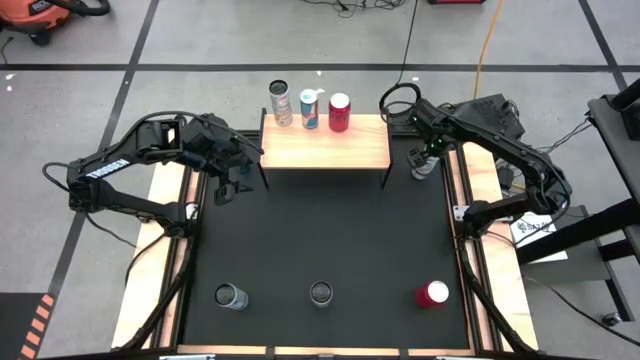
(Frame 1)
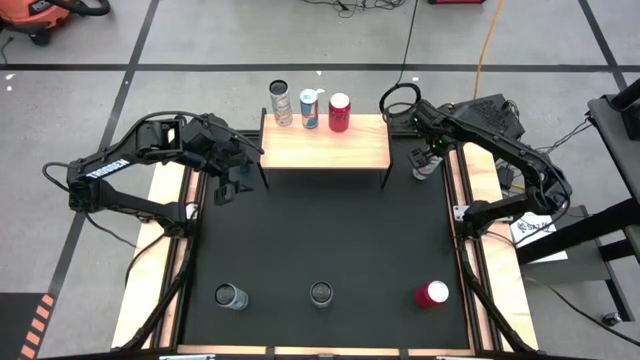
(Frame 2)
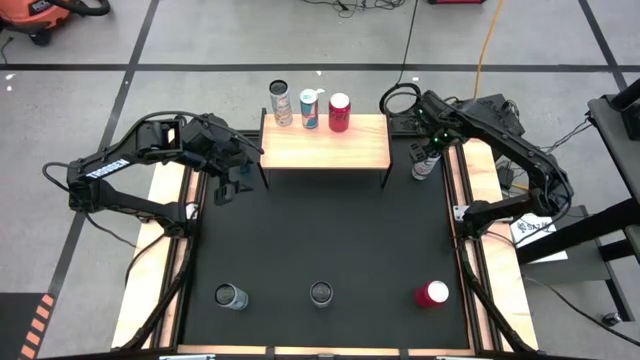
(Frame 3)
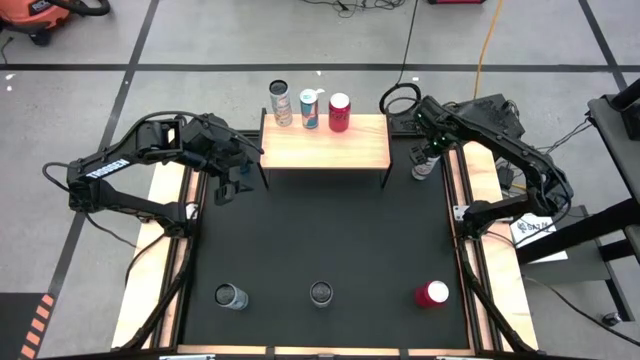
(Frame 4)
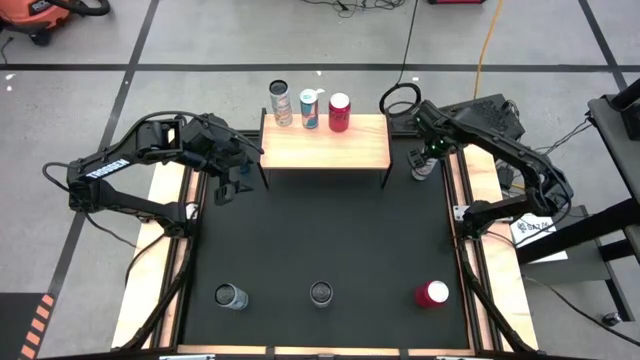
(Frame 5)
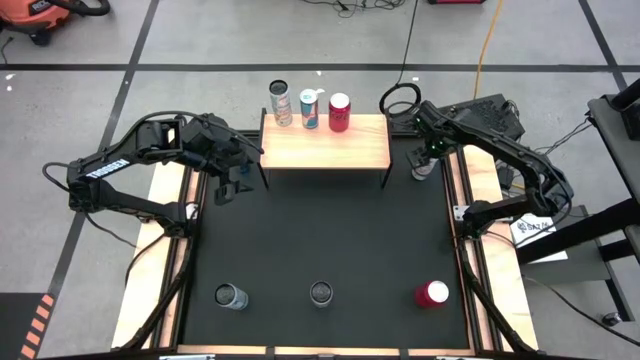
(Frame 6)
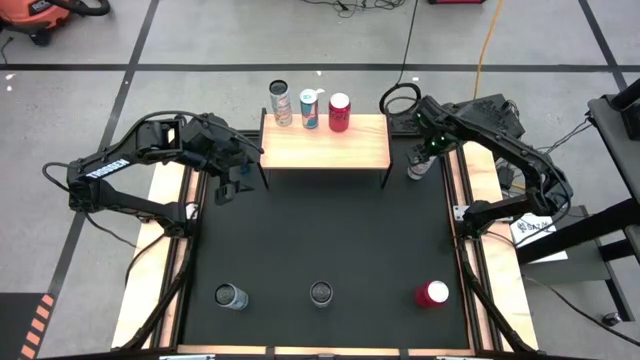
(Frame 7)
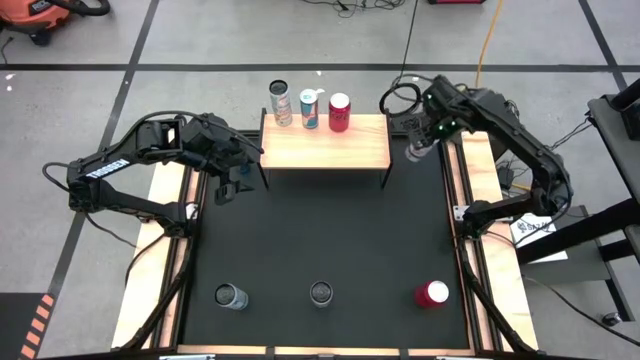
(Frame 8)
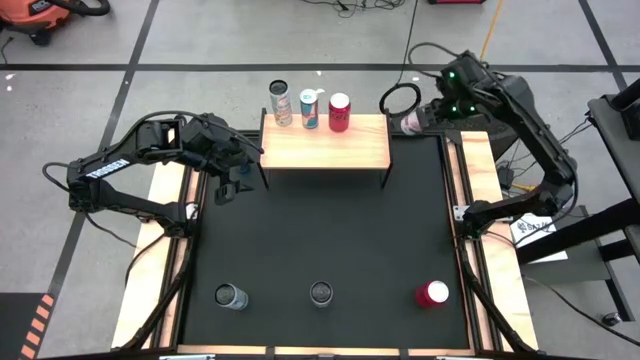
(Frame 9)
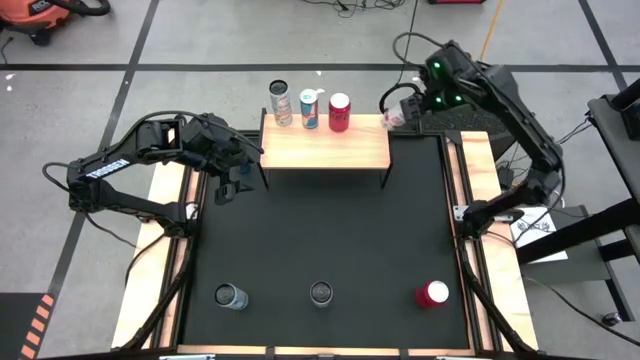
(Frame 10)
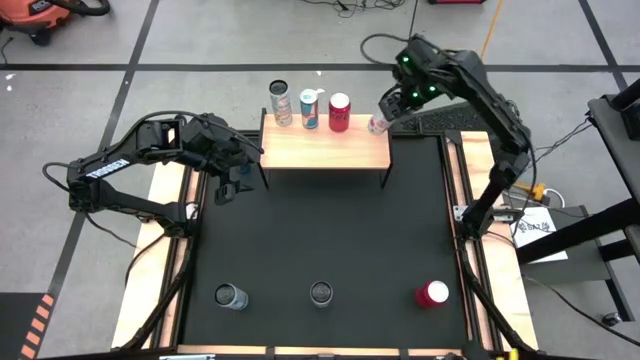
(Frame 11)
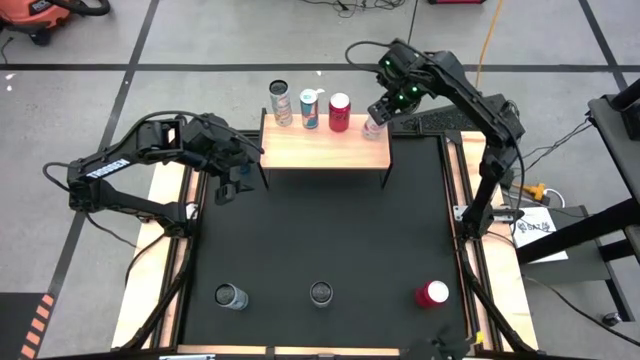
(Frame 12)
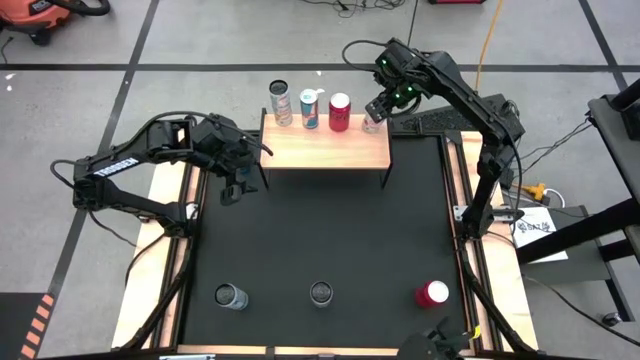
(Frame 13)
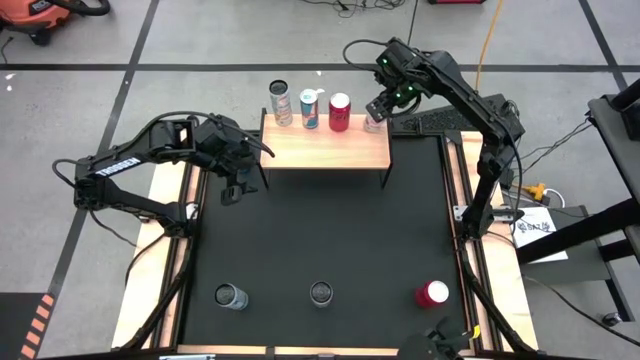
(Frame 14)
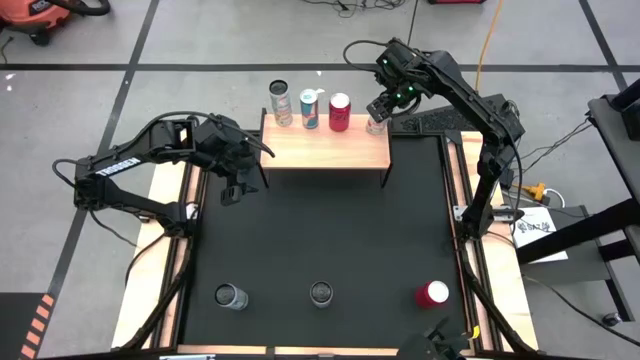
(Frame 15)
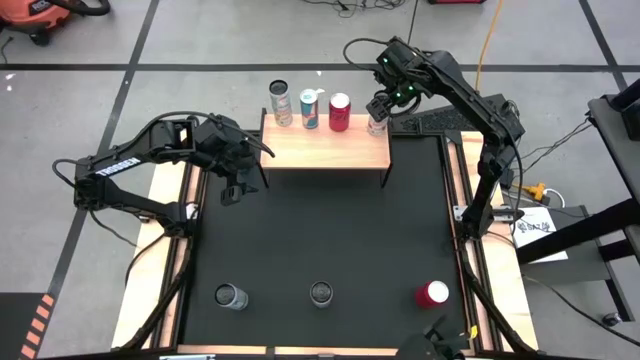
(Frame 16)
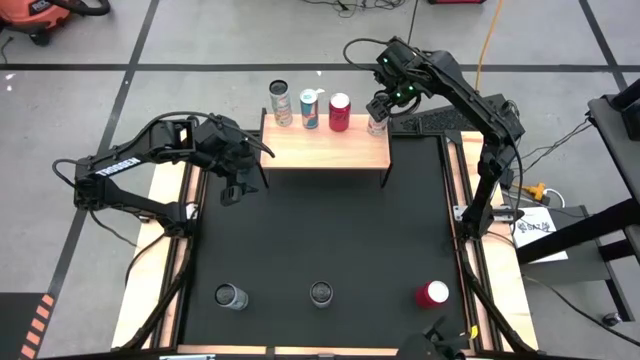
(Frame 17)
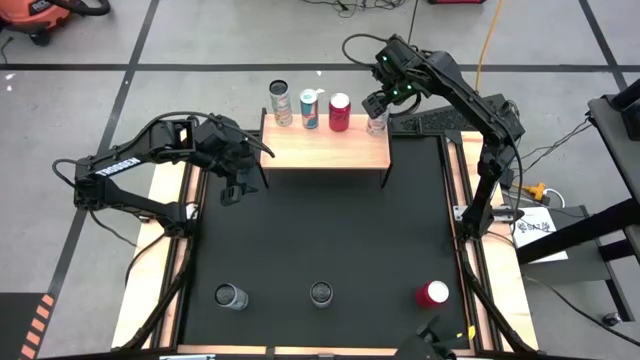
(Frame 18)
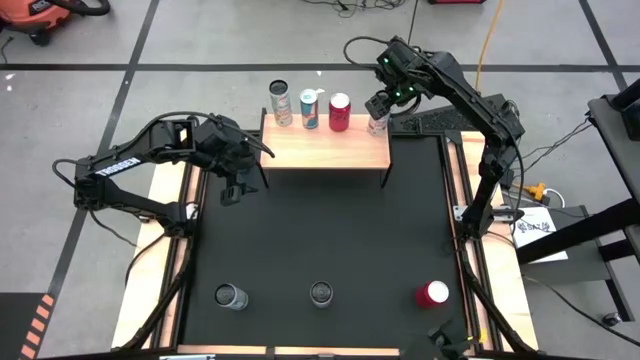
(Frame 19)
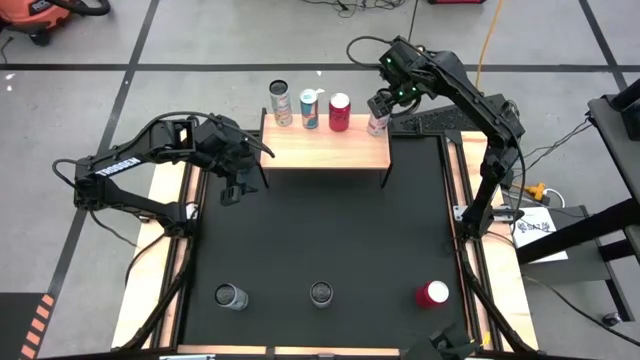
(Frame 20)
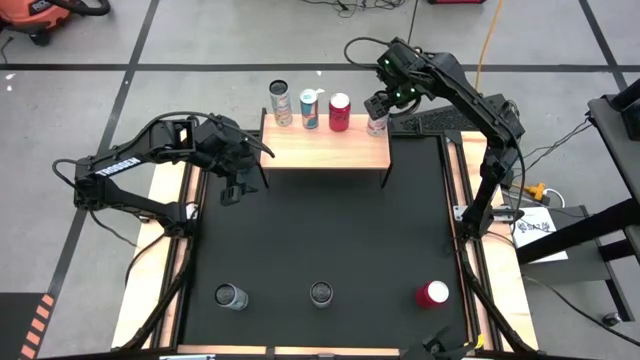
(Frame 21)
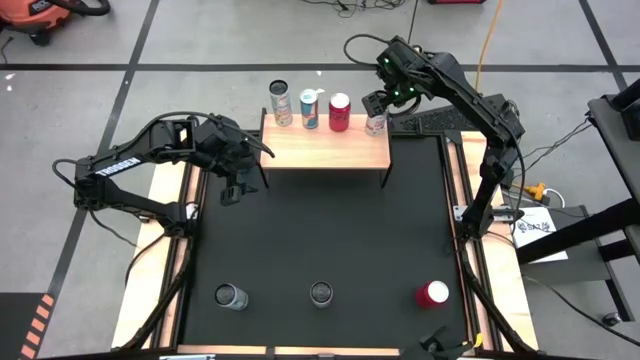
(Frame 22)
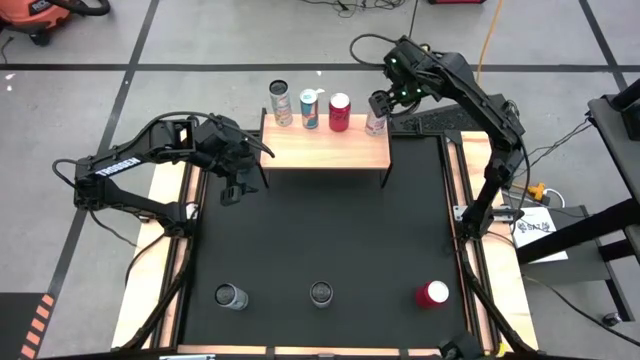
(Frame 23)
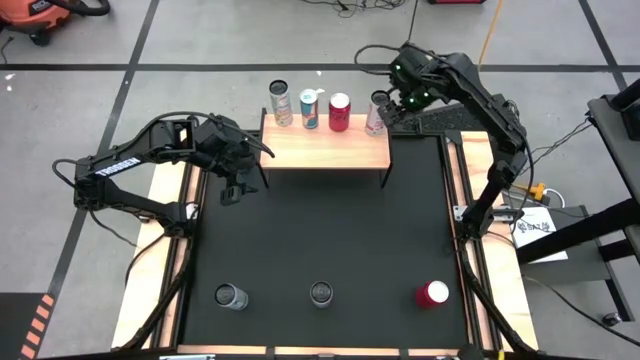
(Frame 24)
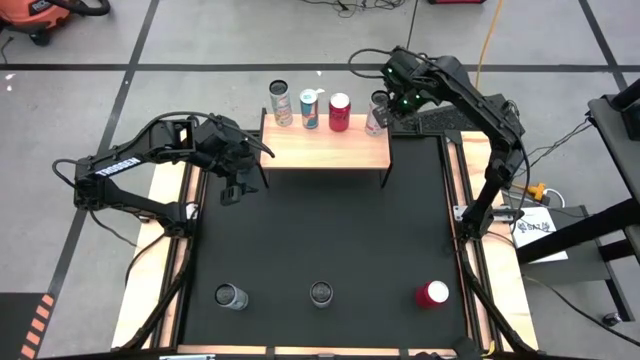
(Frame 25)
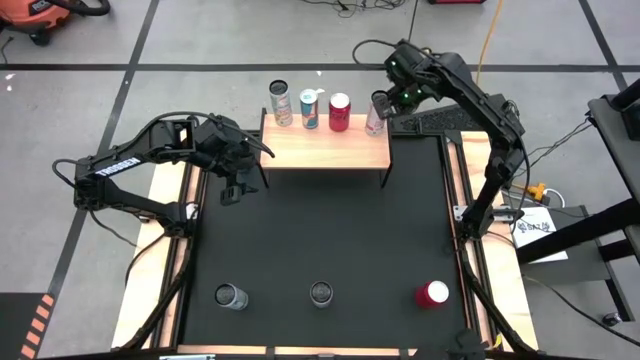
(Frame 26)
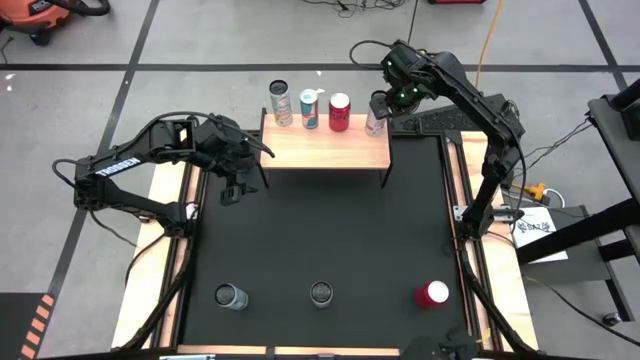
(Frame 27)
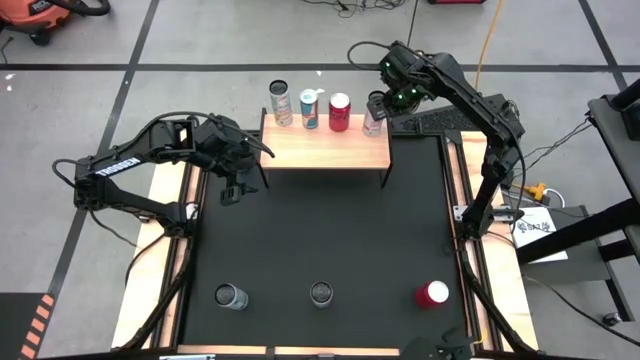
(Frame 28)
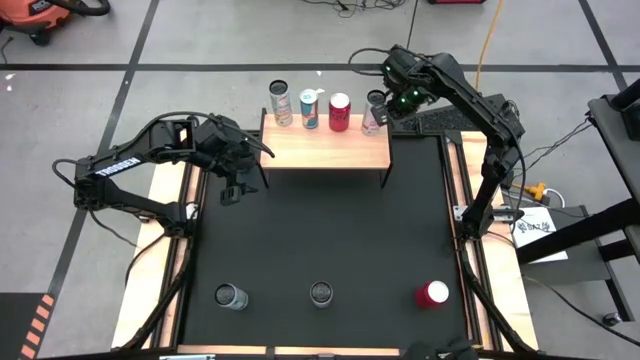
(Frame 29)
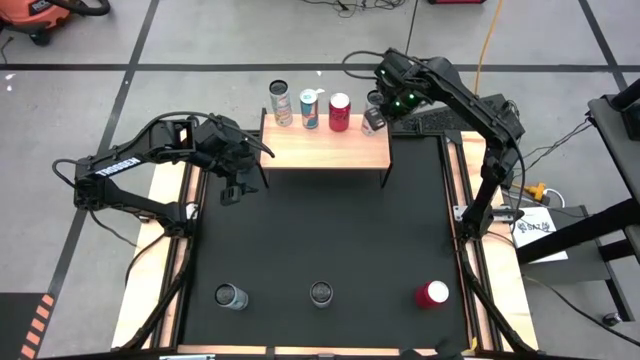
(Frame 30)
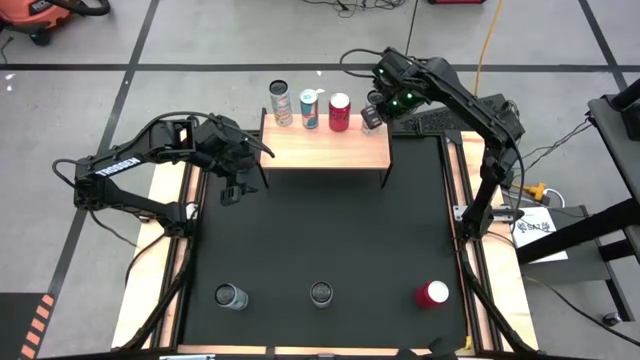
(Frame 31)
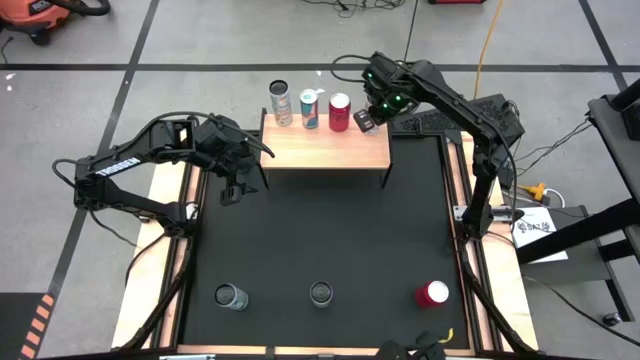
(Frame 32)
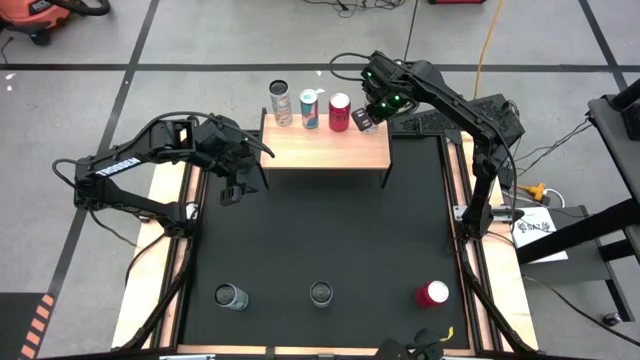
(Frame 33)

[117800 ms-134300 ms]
Task: Place canned beverage on shelf
Put the top white-pink soda can on the shelf

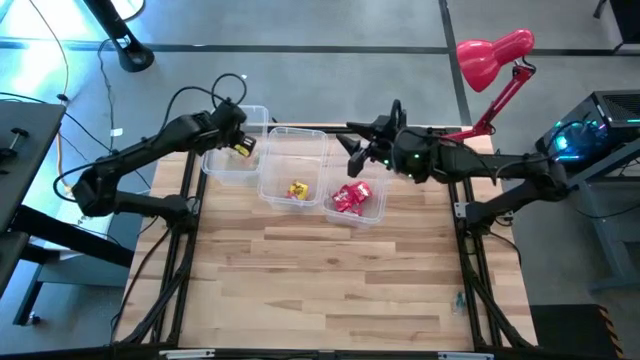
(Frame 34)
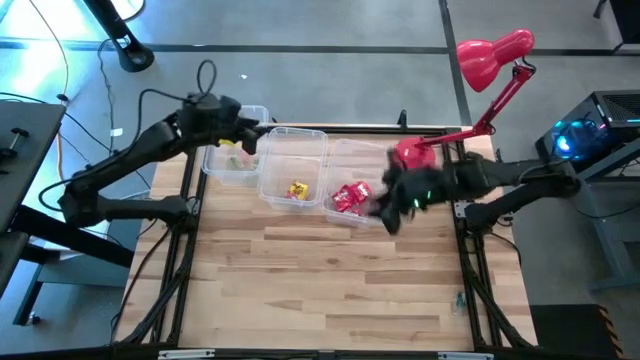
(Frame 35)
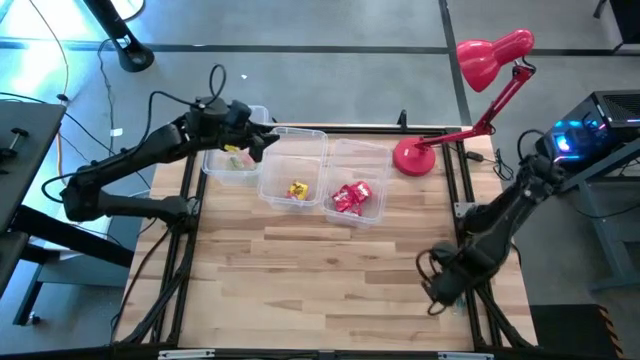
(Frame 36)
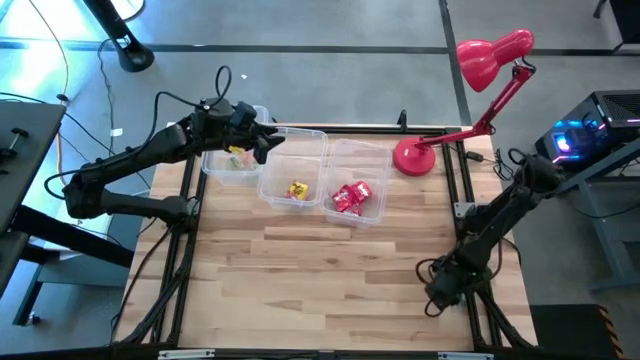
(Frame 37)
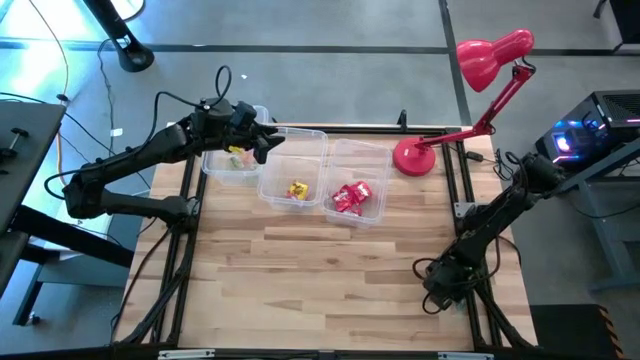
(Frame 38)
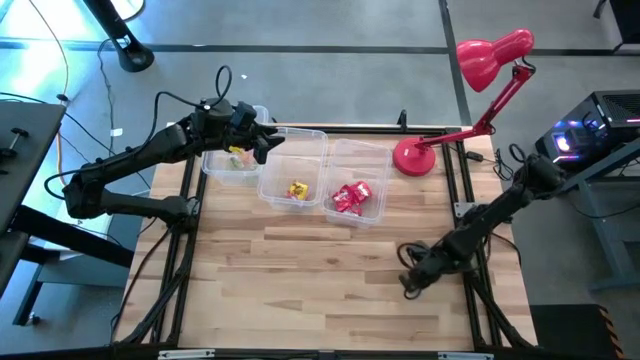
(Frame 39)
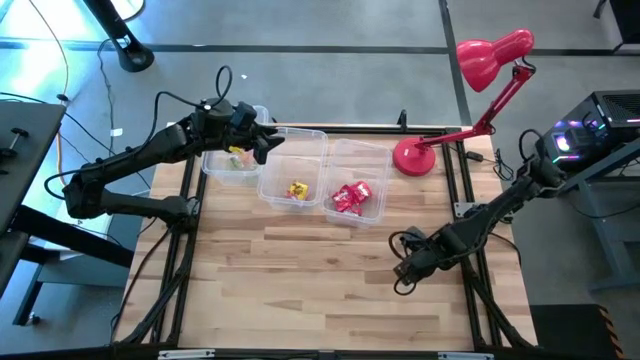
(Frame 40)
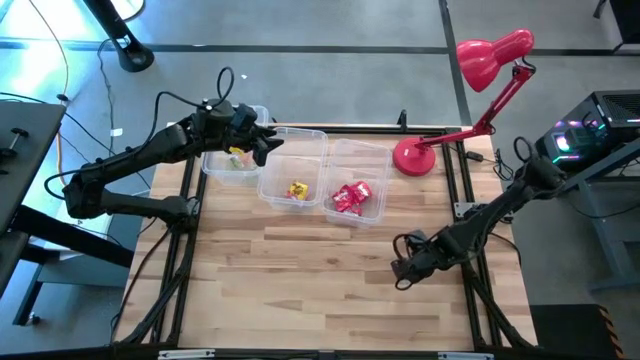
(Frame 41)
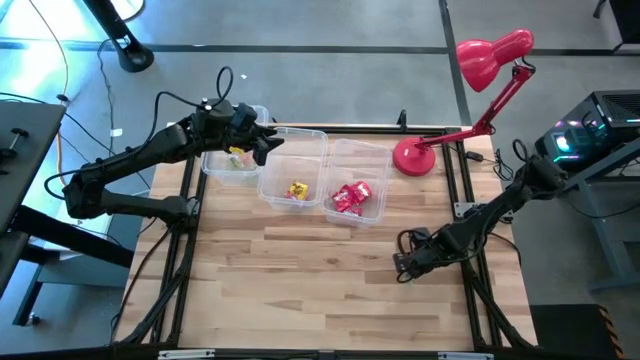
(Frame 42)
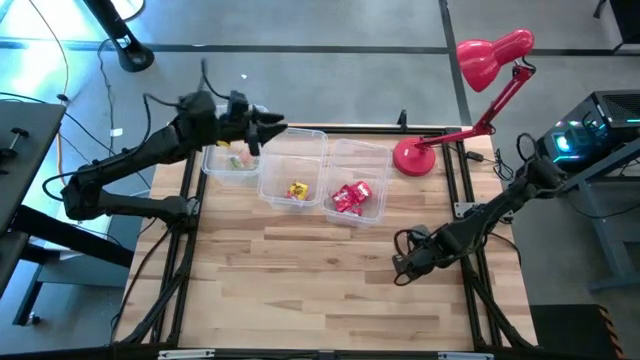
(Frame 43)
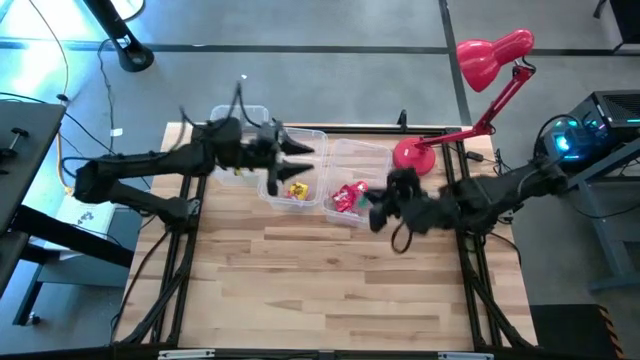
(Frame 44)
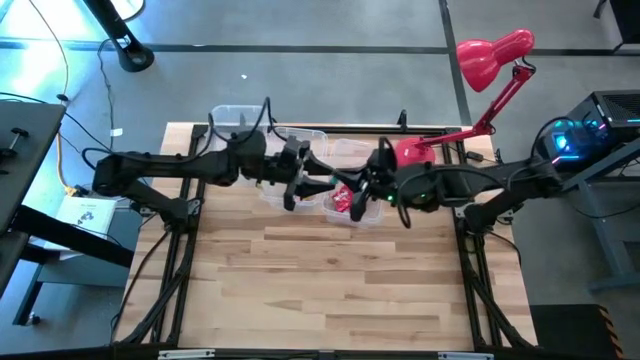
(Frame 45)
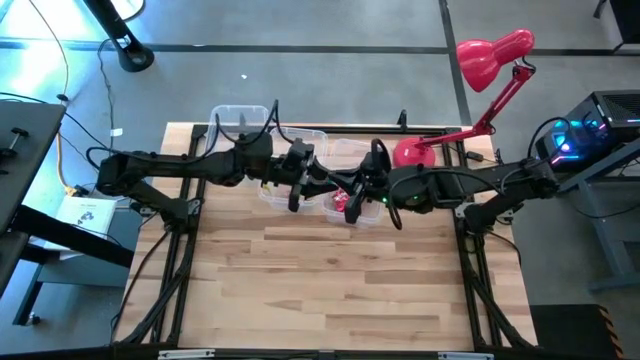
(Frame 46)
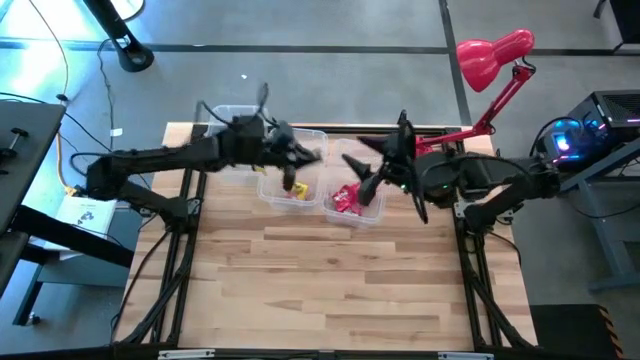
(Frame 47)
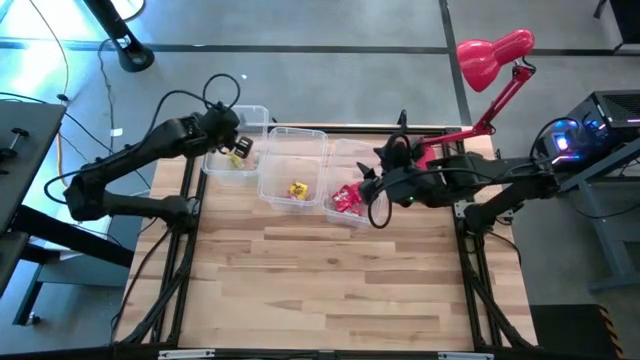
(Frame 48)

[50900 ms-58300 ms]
Task: Sort candy
Put the blue gummy into the left transparent bin
